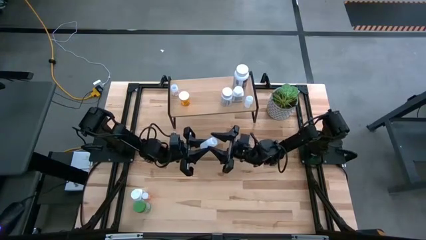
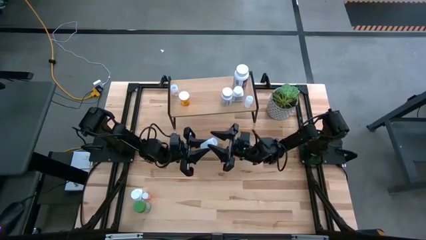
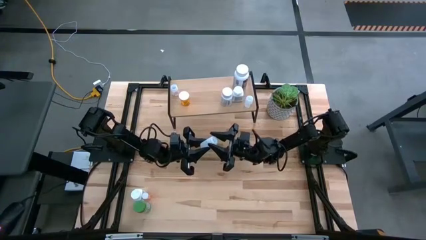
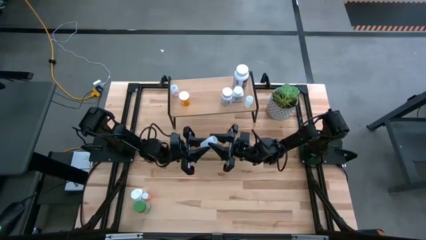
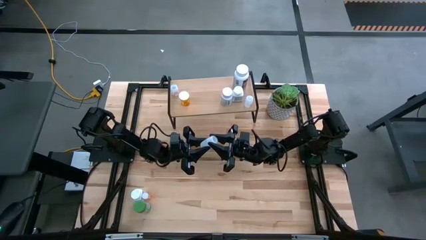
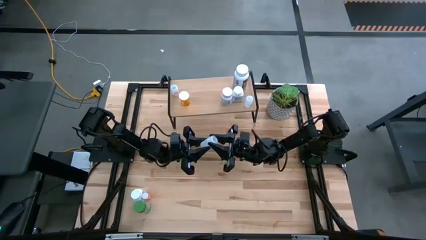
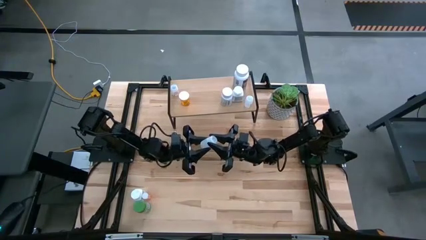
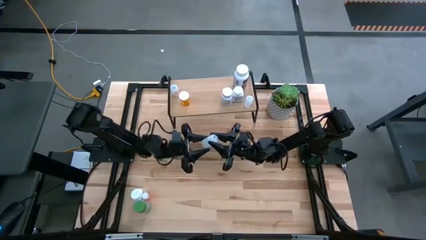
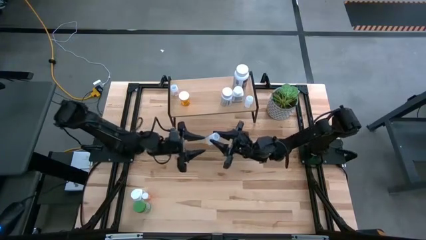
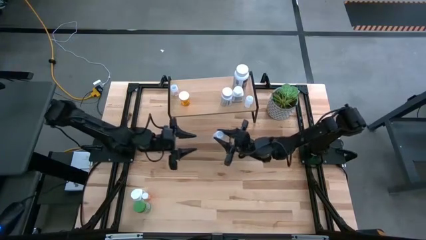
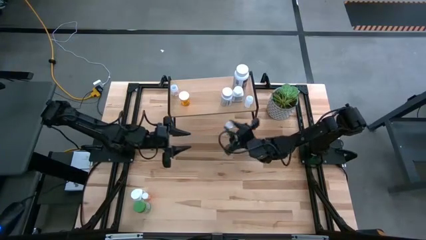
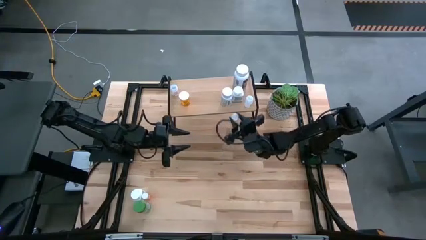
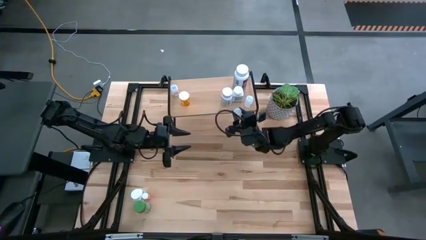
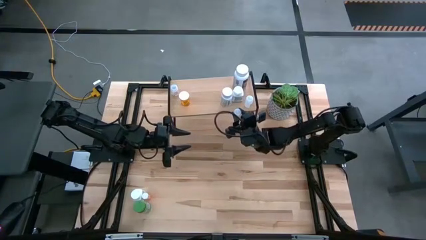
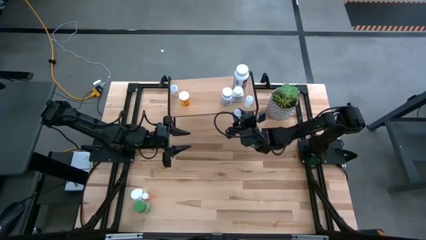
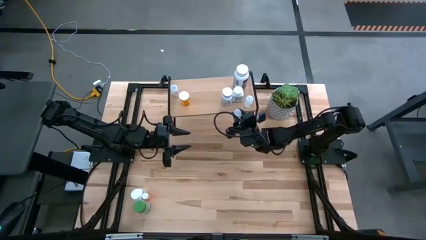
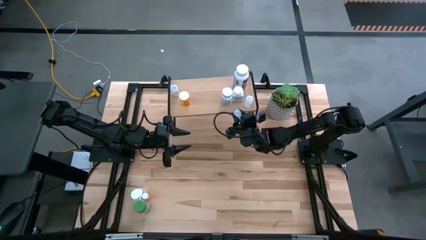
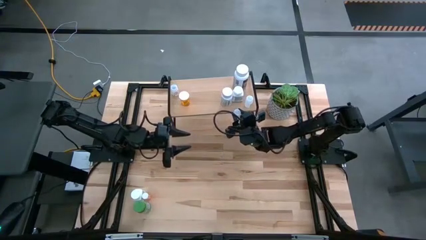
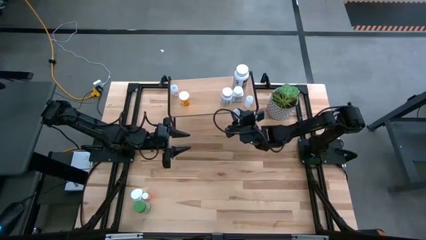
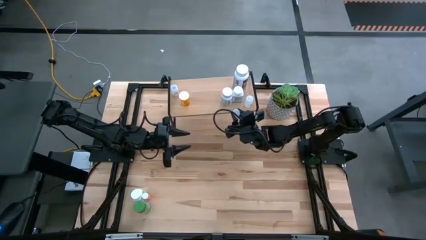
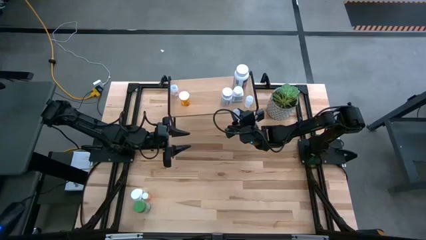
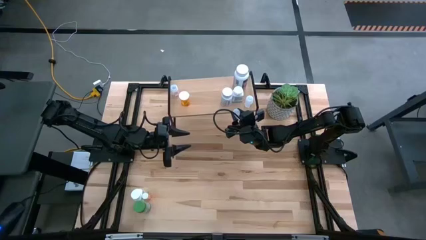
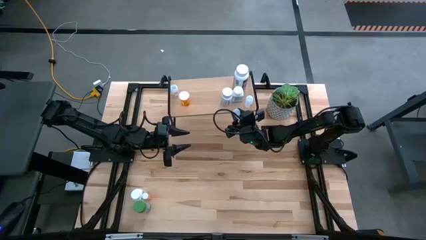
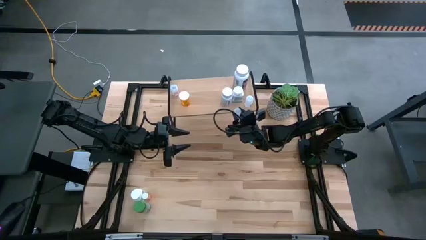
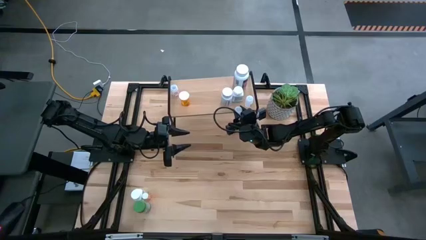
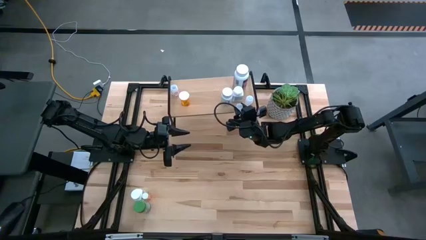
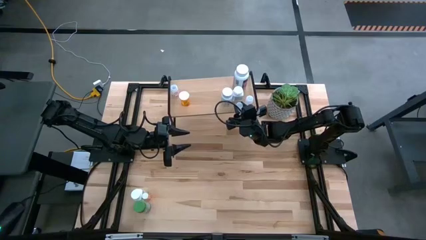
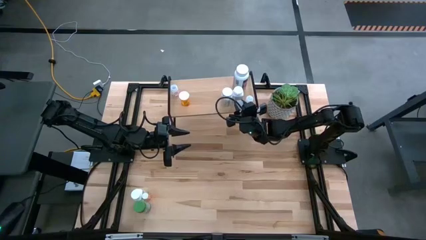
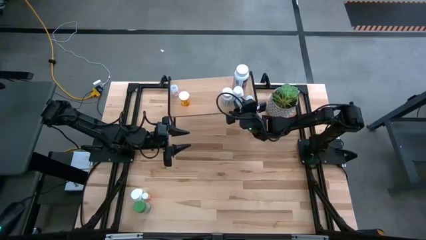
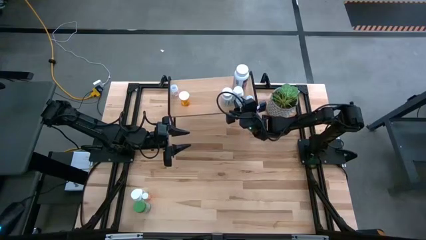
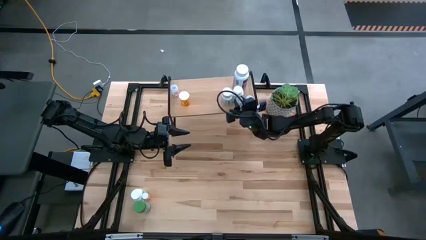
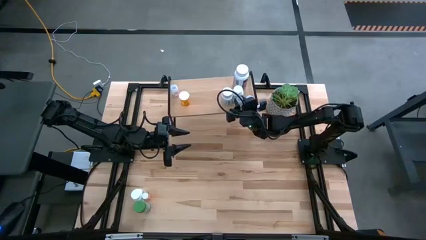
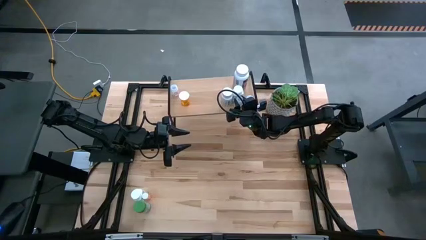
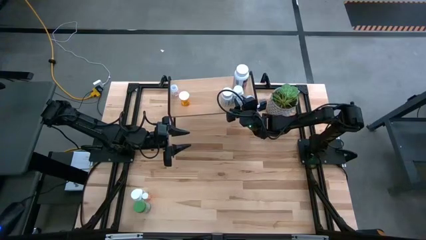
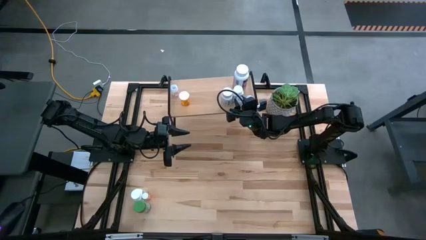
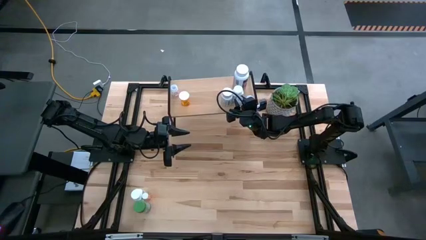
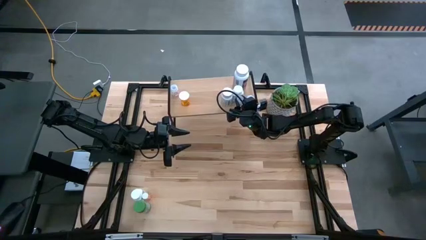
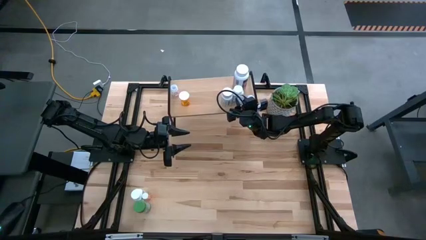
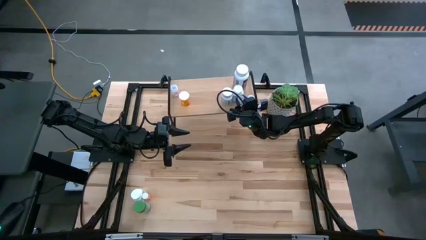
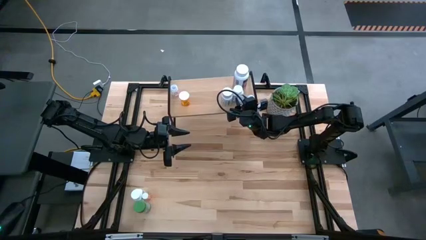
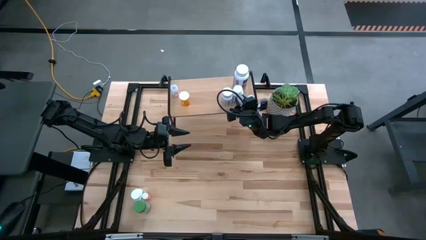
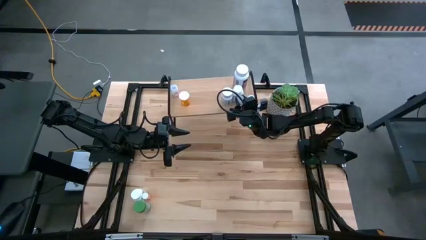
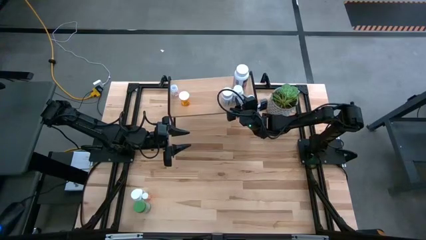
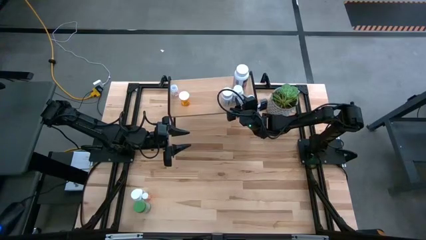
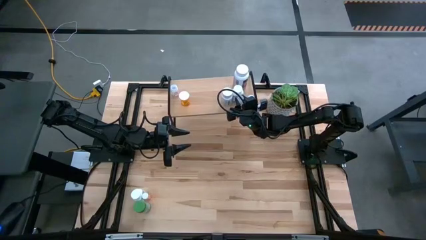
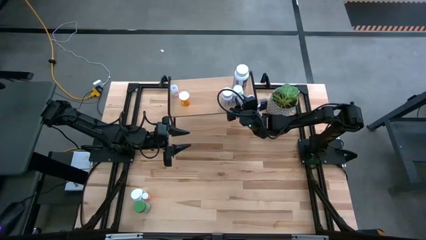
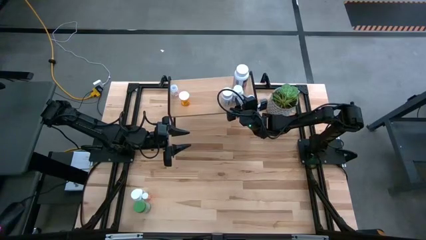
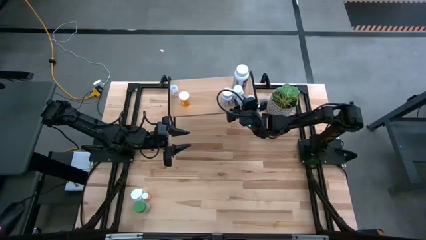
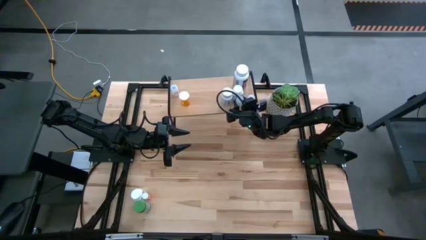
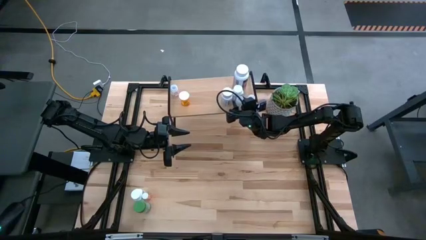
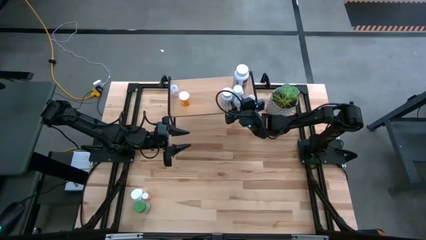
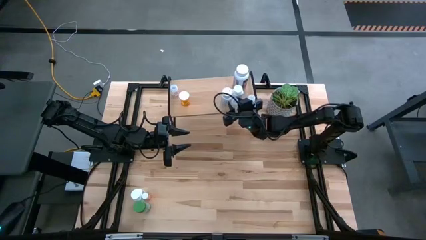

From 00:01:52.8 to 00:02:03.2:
Task: Pick and place medicine bottles onto shelf by color
Put the transparent pill bottle on the shelf
